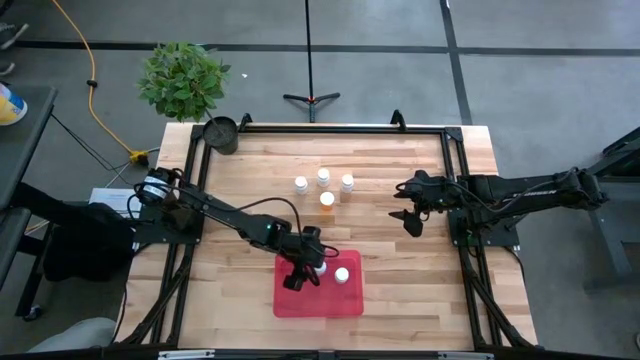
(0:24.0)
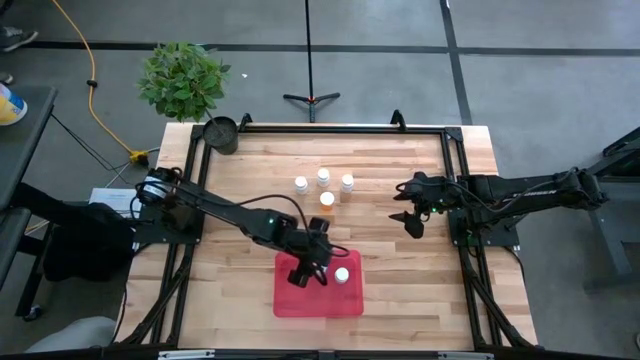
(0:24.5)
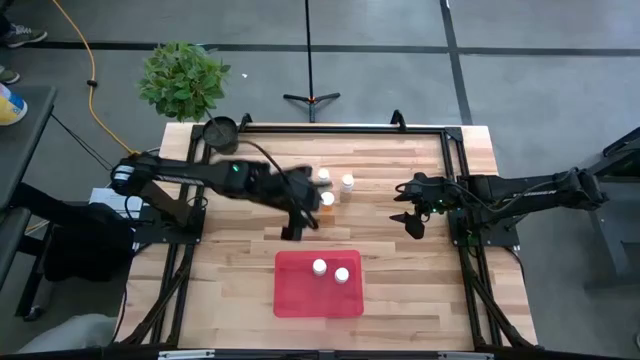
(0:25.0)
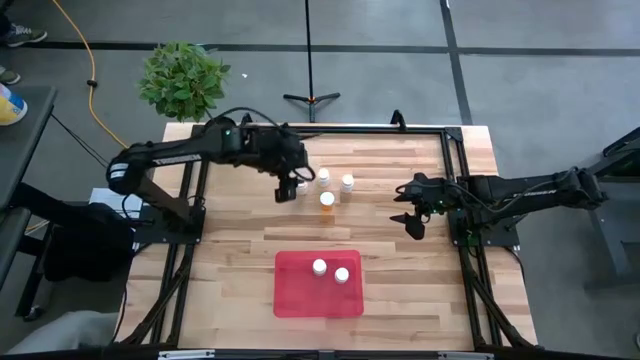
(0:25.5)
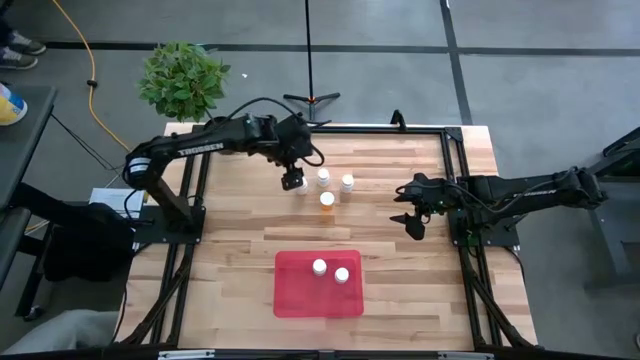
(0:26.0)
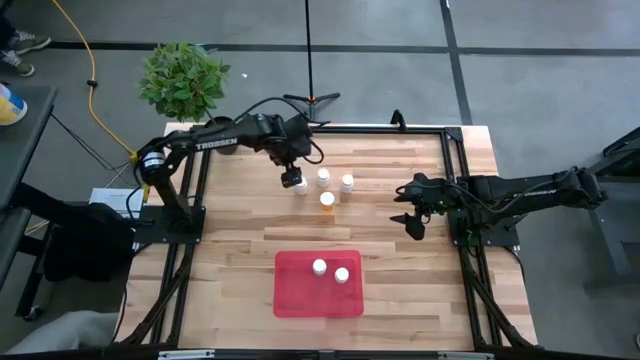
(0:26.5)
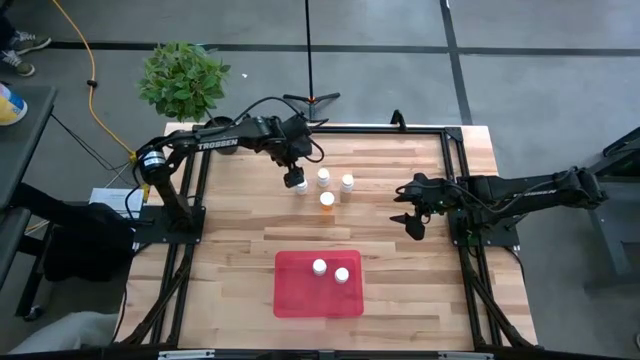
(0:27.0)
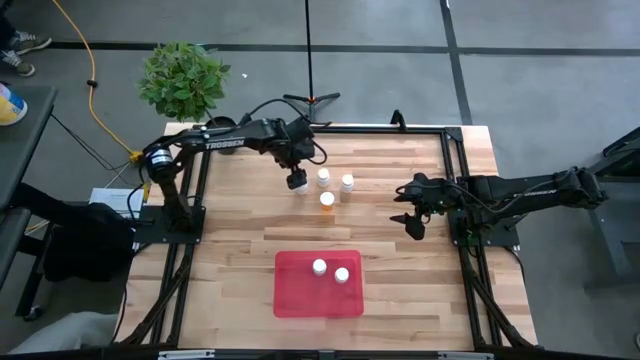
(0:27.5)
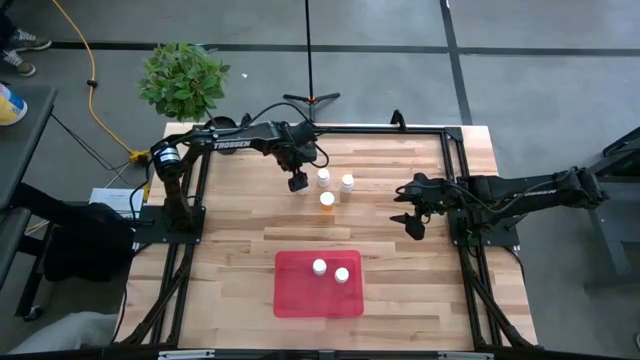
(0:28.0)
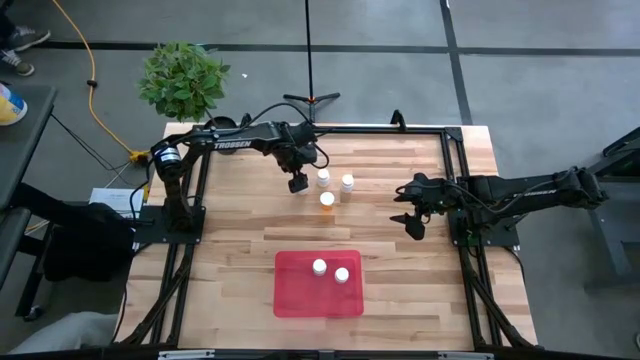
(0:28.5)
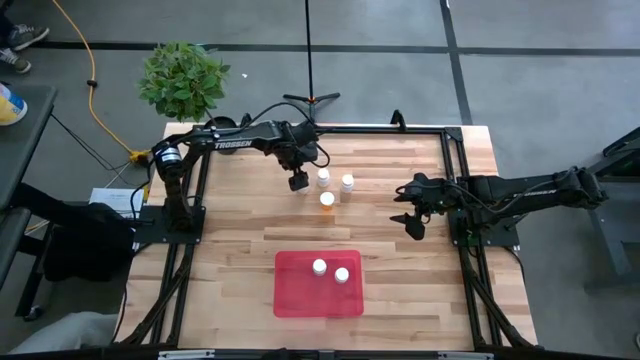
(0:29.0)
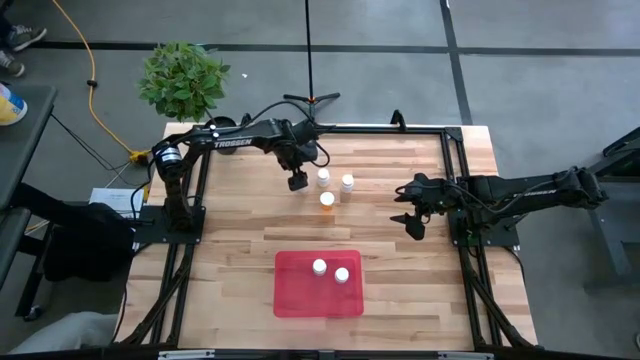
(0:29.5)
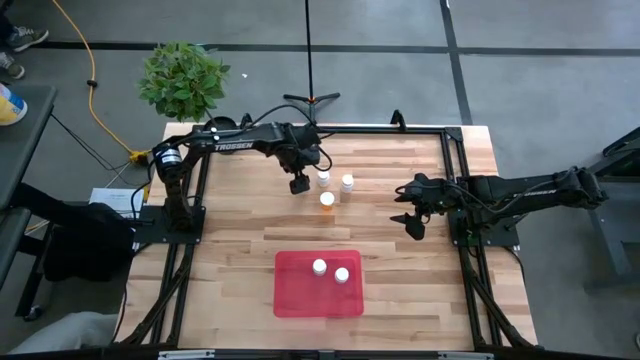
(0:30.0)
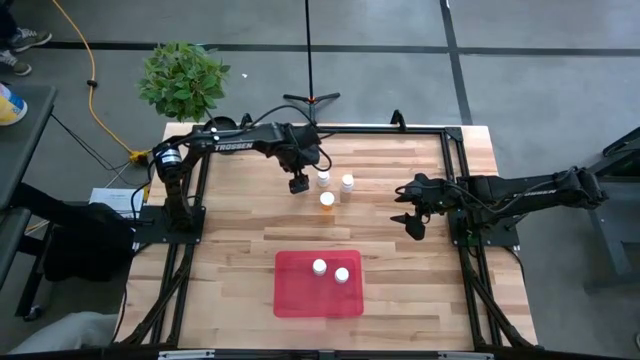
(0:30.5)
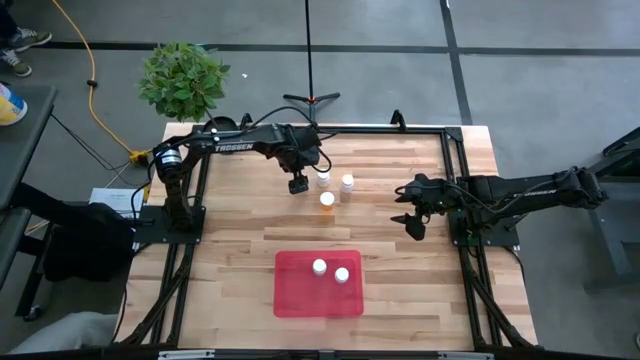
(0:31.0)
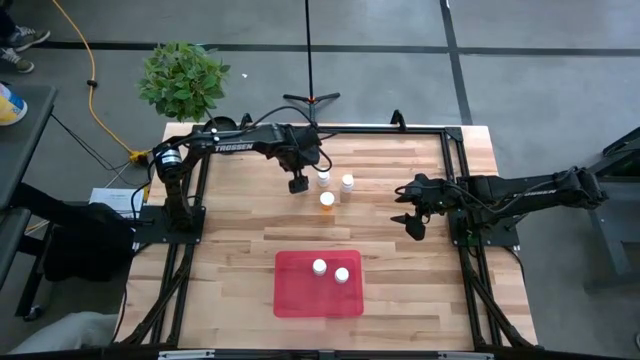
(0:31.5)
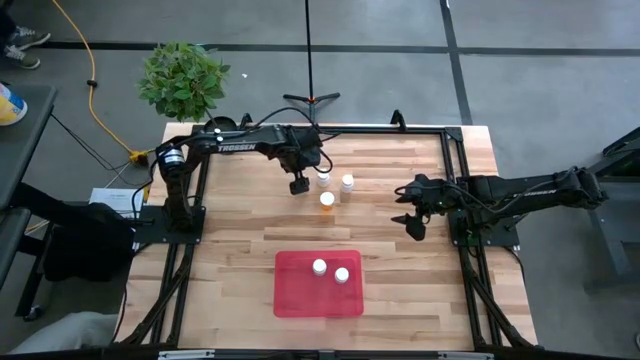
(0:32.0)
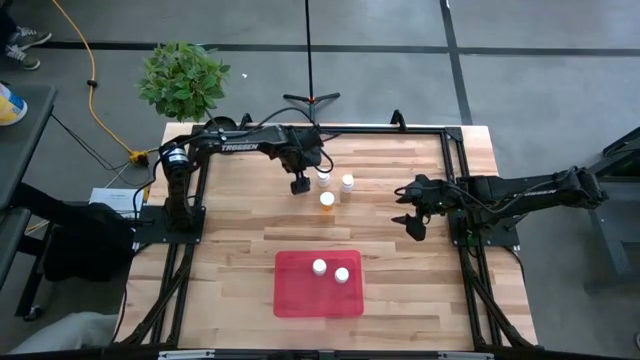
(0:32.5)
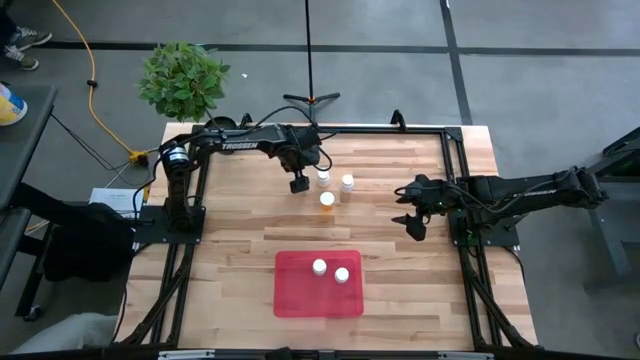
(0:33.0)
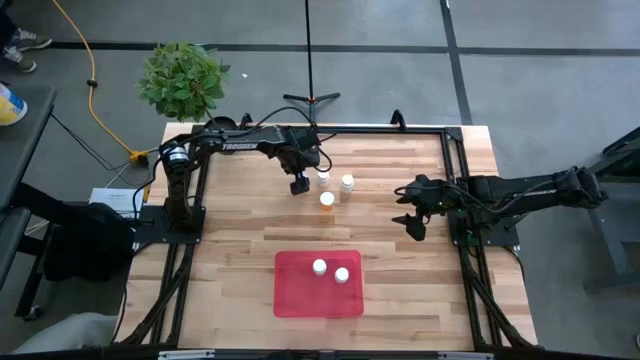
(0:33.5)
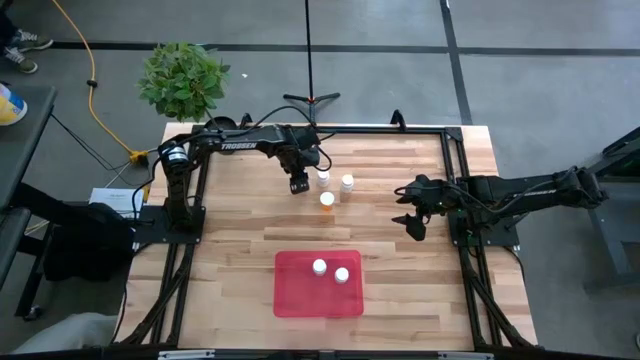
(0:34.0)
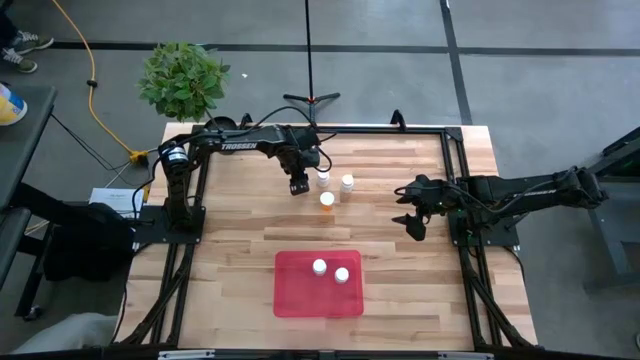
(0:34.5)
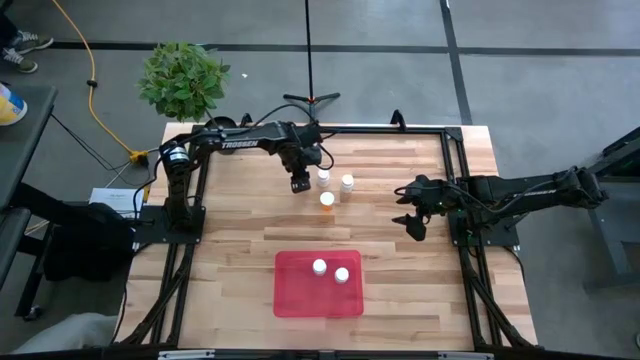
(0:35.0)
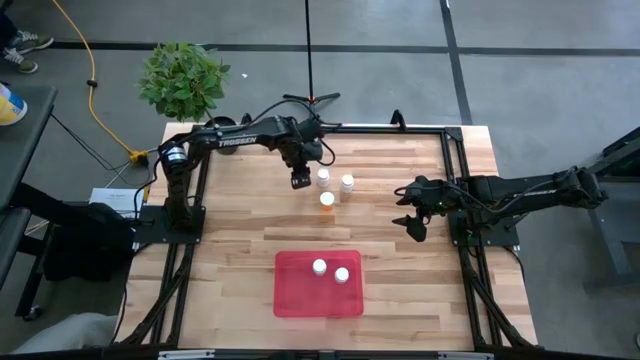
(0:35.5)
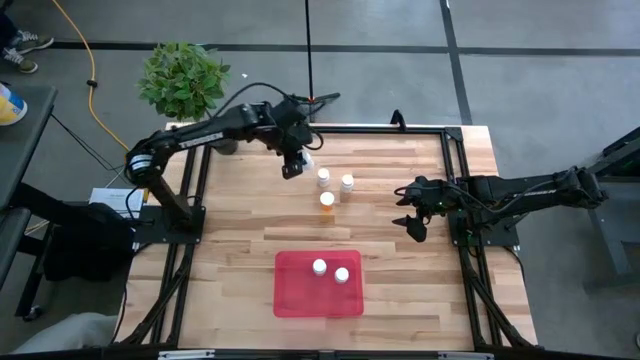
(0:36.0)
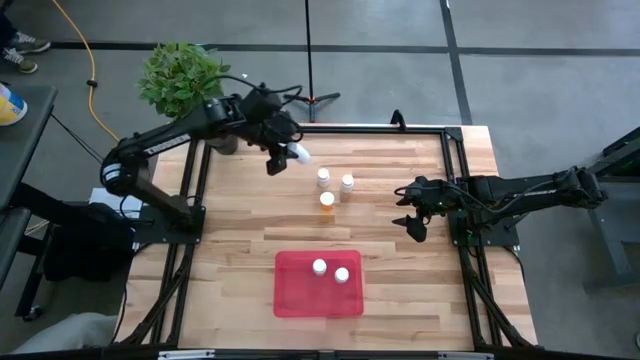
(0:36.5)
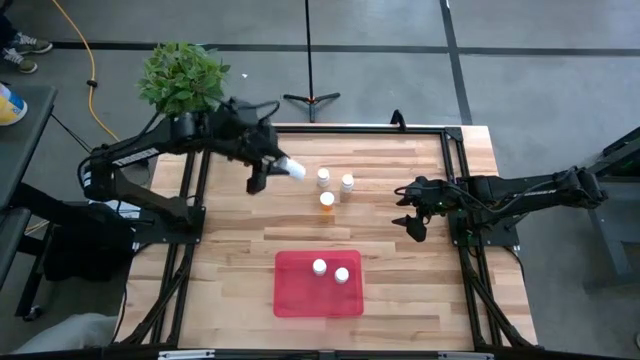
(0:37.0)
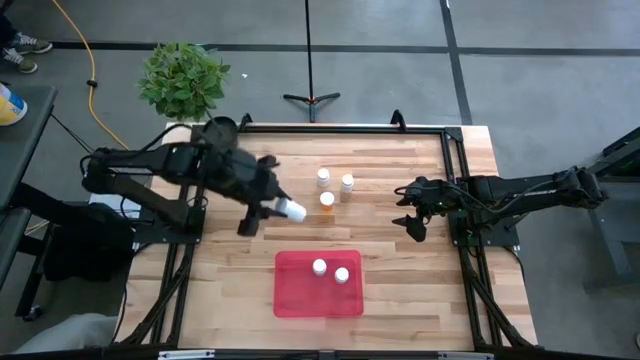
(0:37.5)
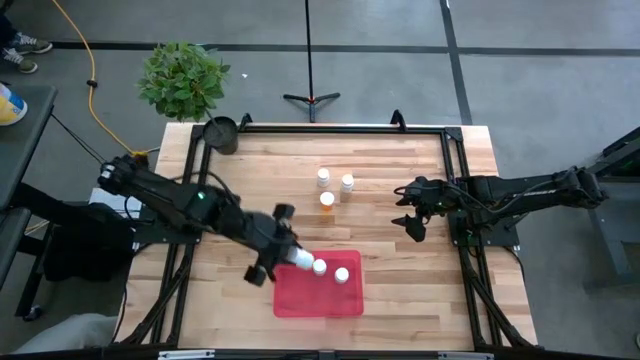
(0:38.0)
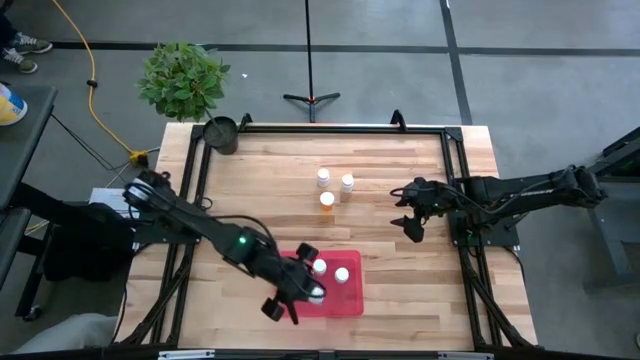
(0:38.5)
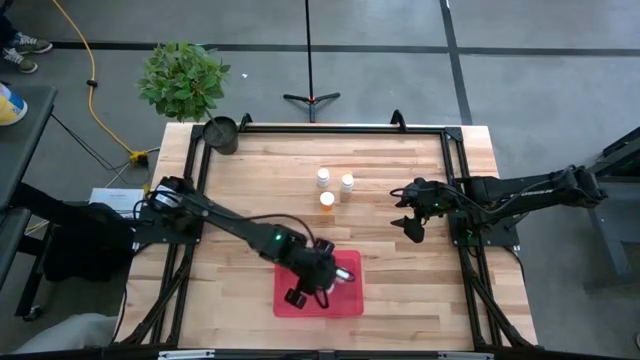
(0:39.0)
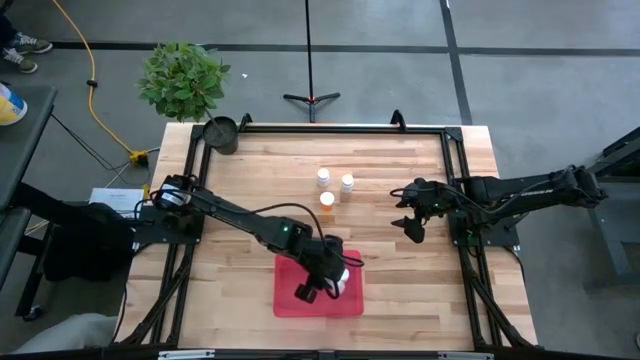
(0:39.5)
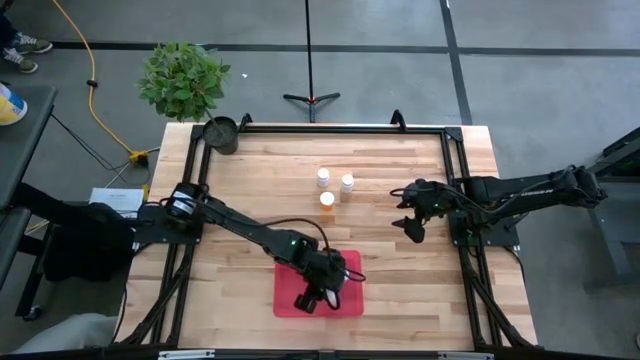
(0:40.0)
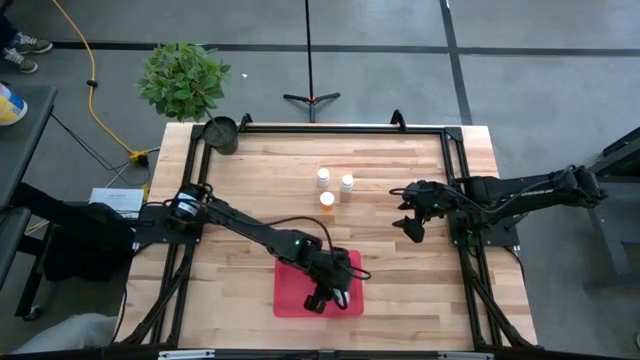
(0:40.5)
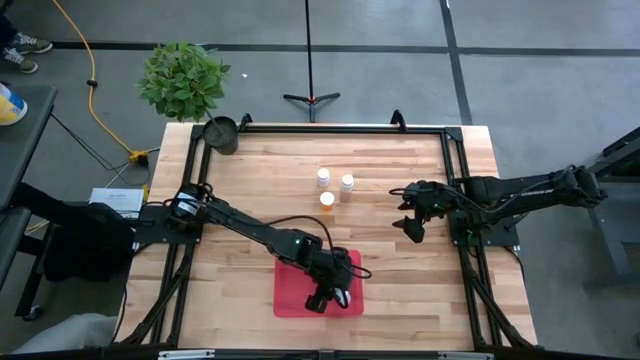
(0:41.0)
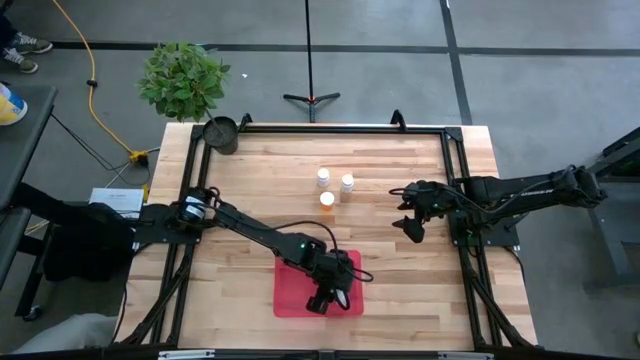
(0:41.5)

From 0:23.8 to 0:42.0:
Task: Pick and place pill bottles into a basket
Put the white medicine bottle into the red bin

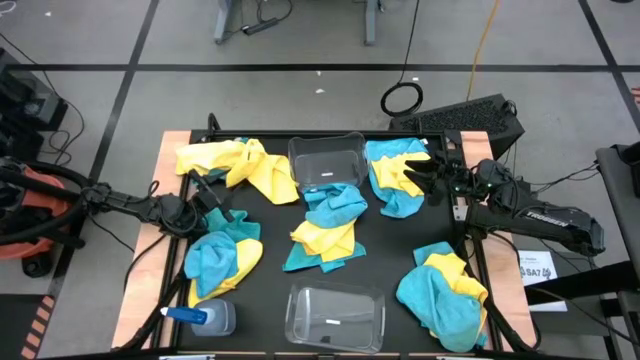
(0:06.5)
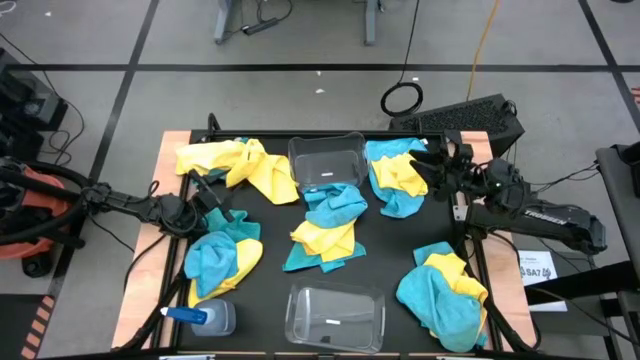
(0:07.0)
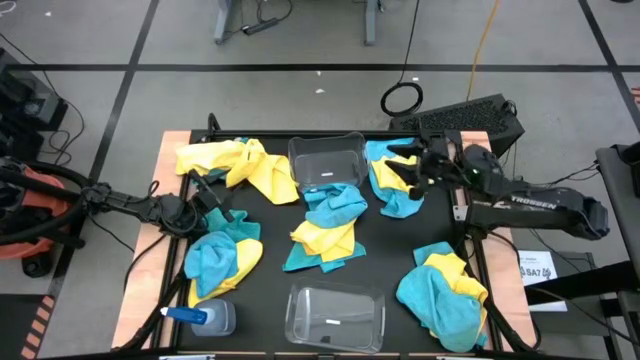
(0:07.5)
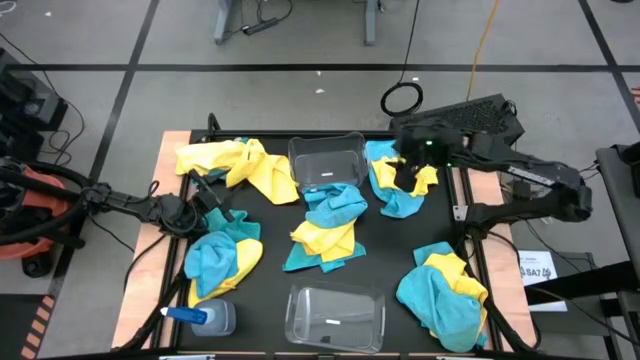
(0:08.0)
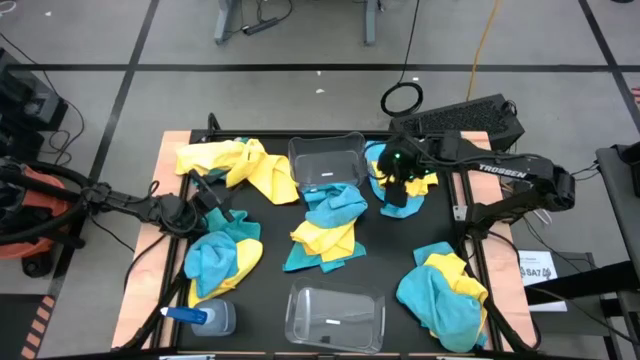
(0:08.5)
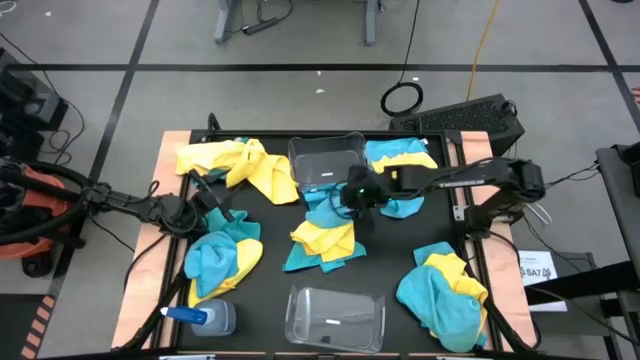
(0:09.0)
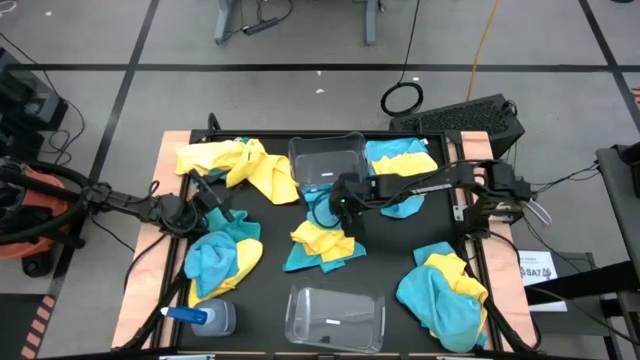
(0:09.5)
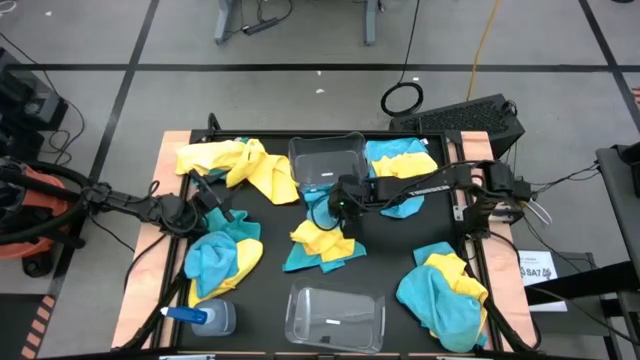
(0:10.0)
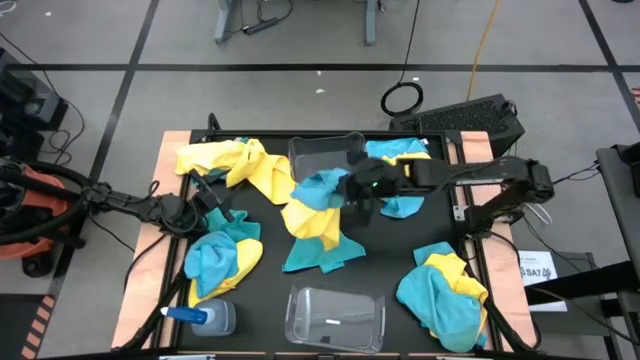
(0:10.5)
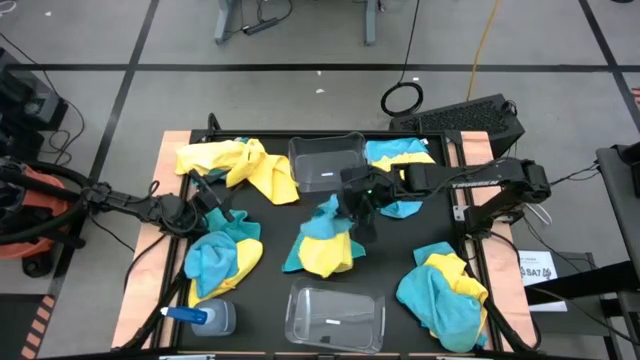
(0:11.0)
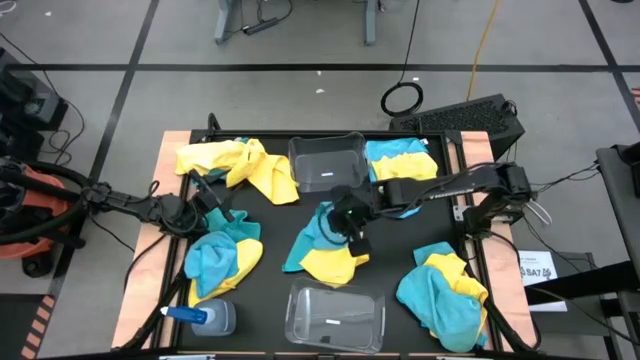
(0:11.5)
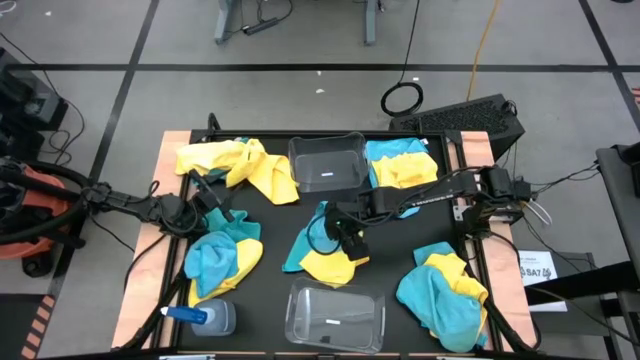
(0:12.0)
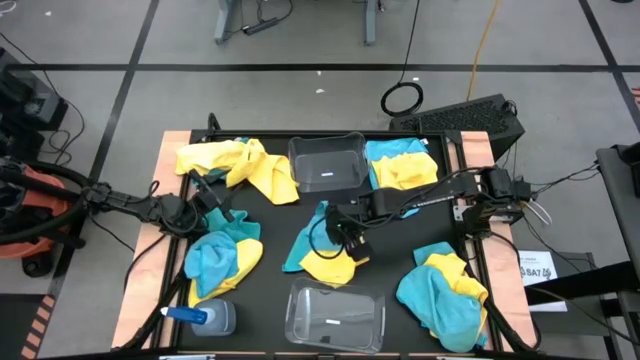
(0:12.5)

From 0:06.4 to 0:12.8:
Task: Sort microfiber towel by color & place in baskets
Put the blue microfiber towel into the top transparent bin
